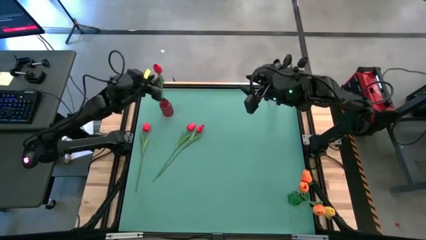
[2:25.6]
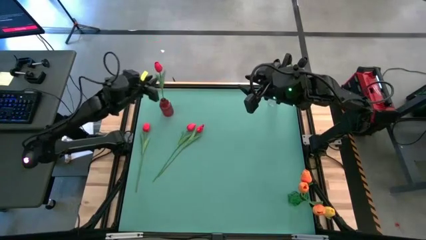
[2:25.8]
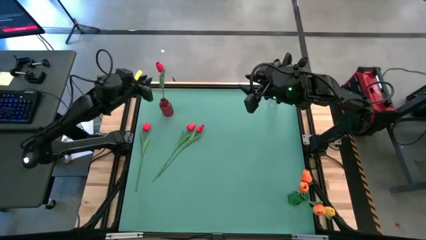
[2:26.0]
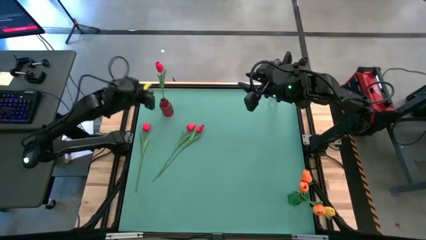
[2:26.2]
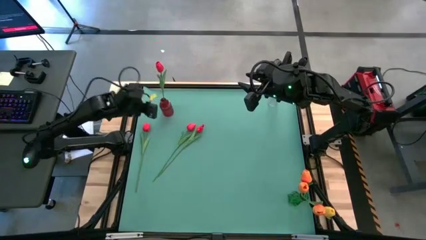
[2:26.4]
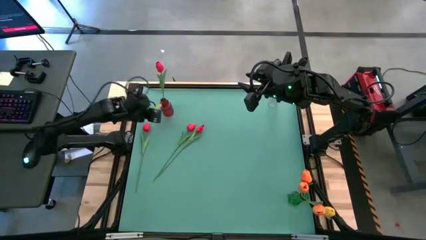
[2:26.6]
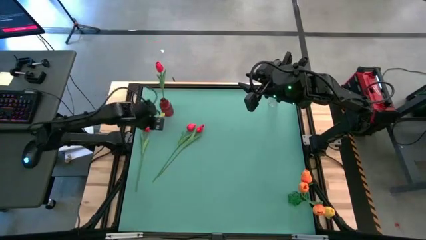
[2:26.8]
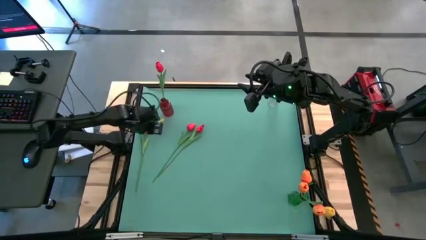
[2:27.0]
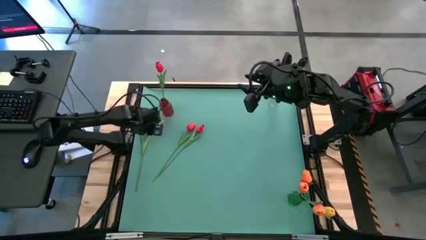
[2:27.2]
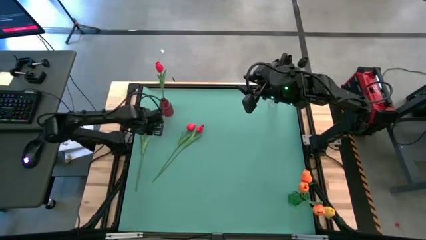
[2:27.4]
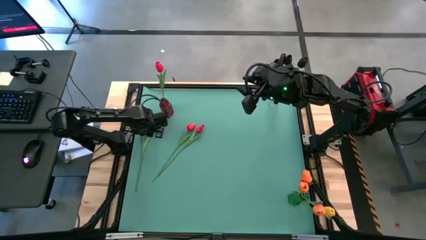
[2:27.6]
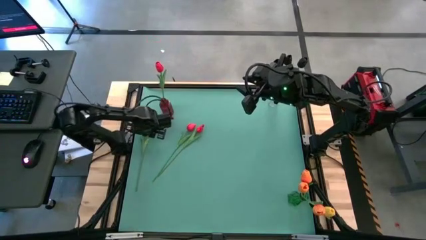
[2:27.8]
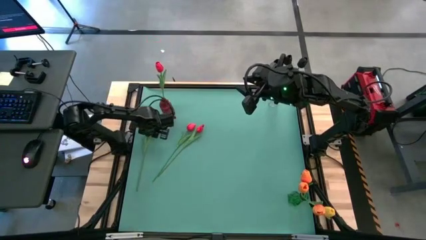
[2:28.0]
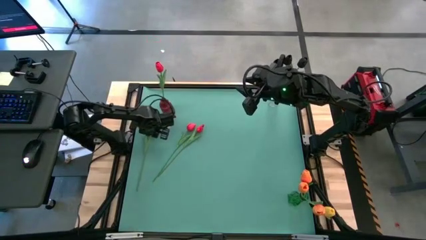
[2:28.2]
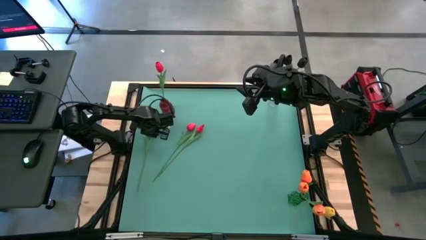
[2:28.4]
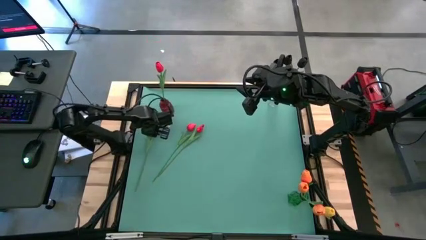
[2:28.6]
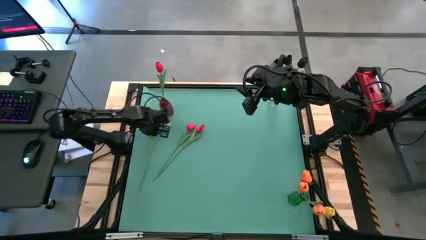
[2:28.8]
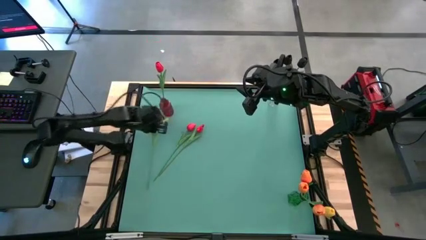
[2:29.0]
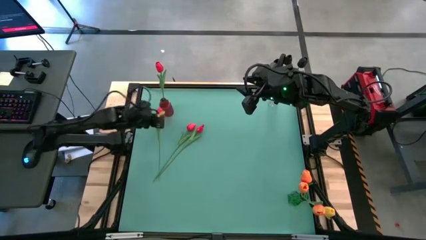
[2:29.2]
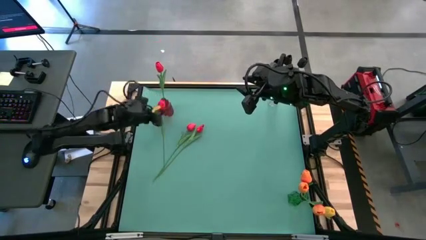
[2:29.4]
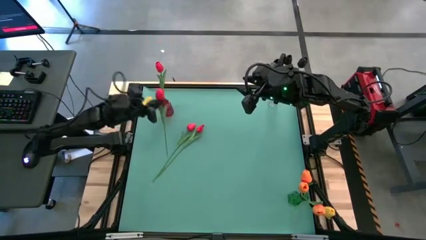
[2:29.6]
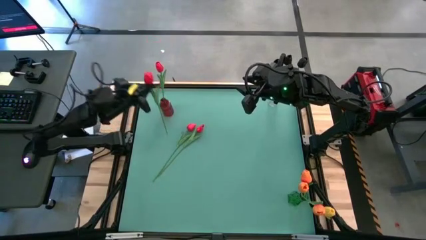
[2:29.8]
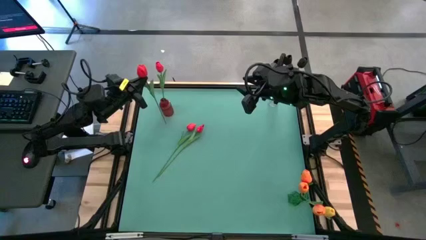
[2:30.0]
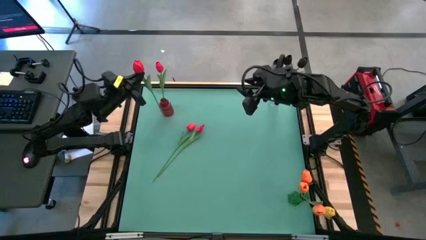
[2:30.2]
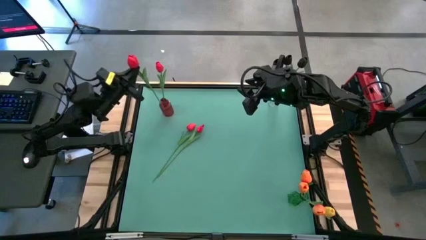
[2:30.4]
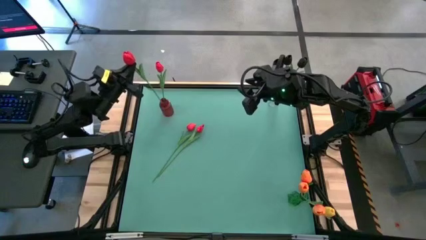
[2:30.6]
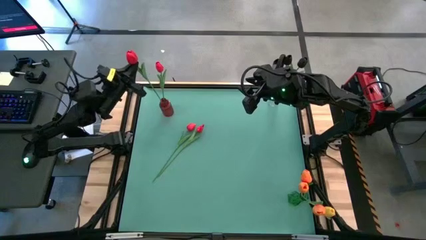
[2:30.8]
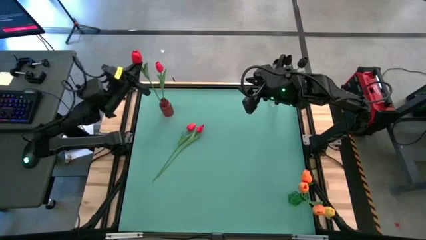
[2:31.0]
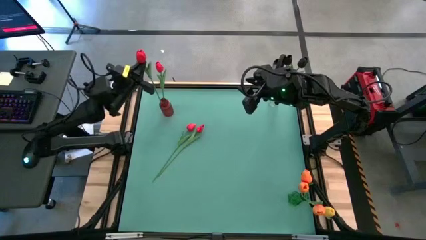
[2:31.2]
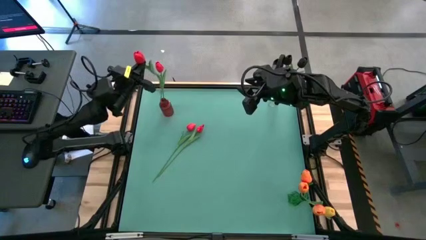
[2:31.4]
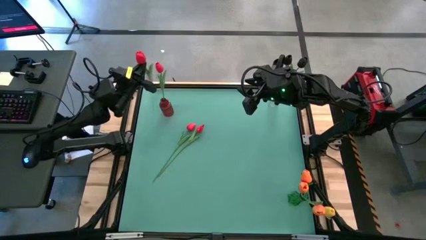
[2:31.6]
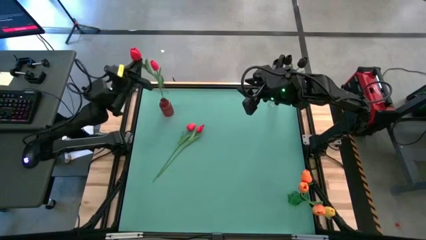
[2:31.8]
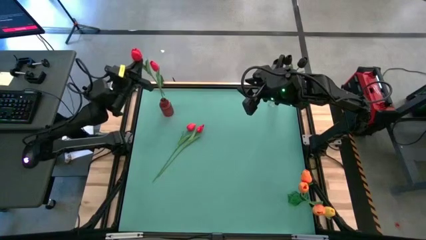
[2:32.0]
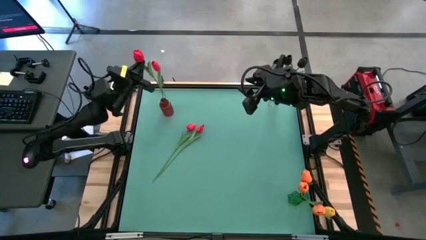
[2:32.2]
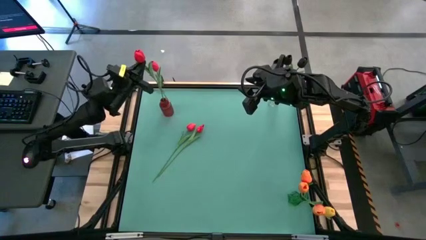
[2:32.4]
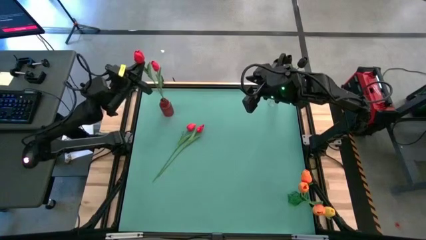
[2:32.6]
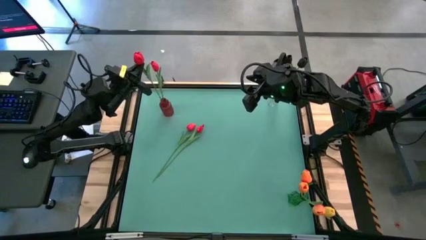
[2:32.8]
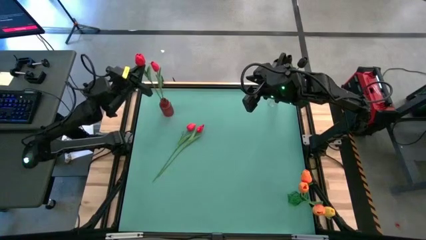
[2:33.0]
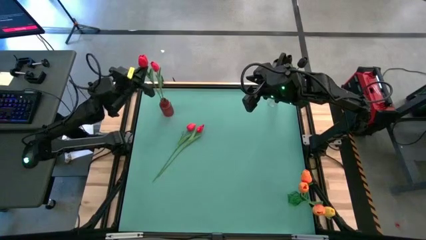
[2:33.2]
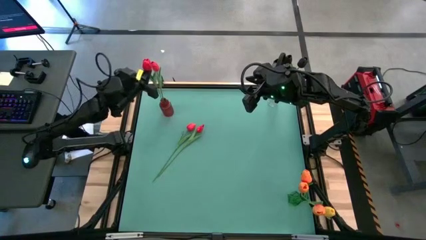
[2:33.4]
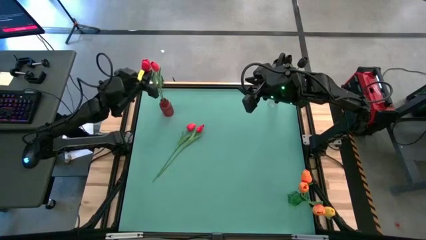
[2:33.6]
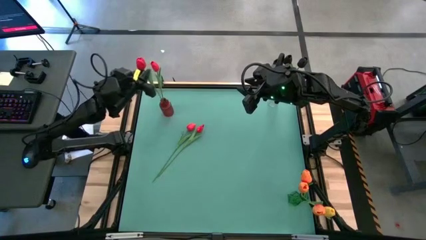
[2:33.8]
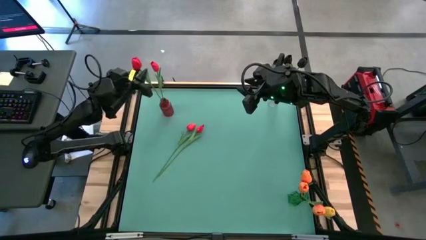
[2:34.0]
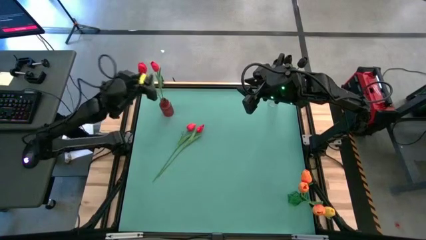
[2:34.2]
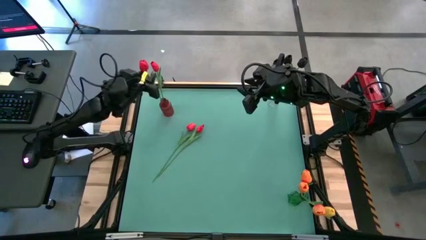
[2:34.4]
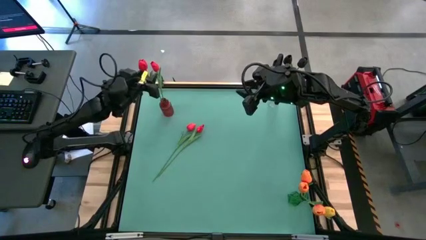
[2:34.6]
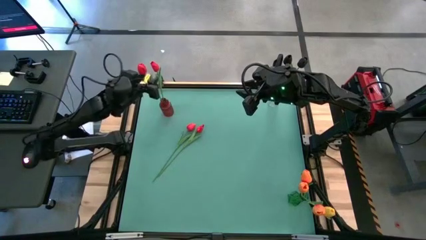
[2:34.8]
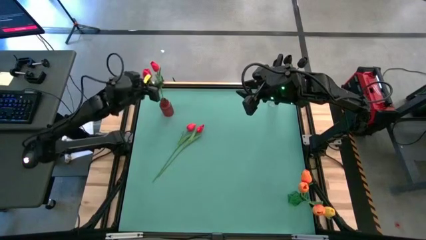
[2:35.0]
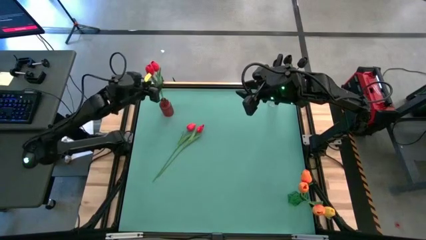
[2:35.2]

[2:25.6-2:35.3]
Task: Sort flowers into vase by color
Put the red tulip into the red vase

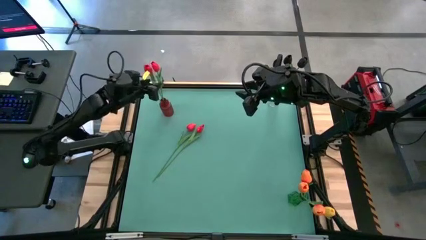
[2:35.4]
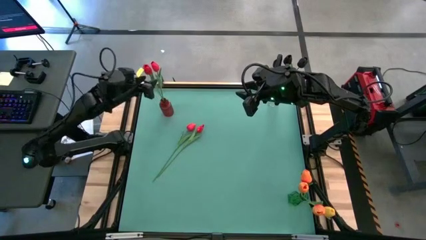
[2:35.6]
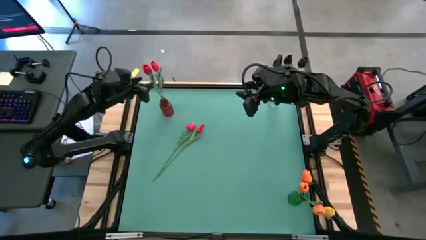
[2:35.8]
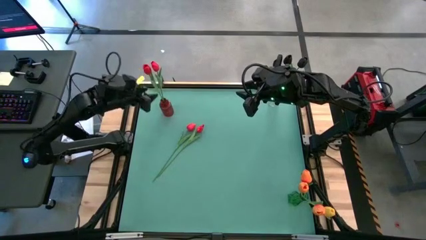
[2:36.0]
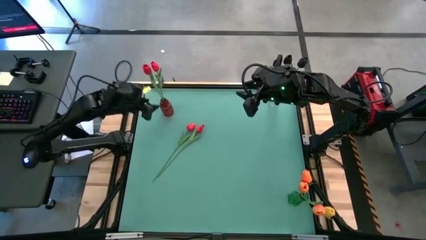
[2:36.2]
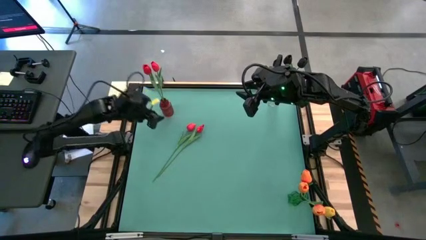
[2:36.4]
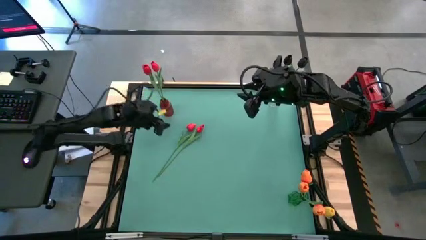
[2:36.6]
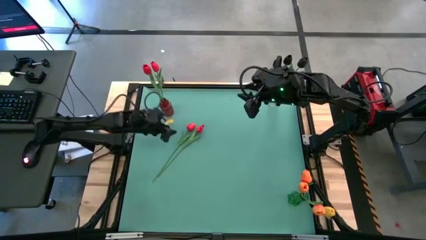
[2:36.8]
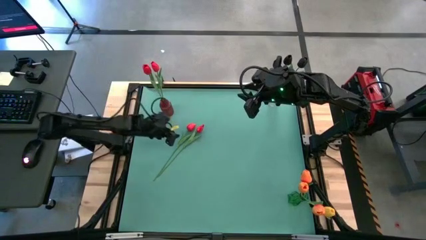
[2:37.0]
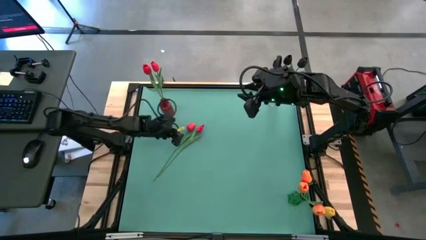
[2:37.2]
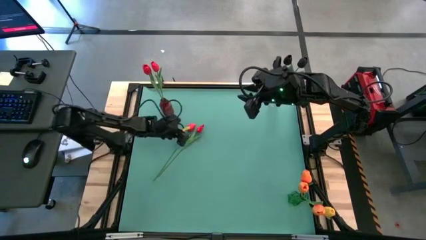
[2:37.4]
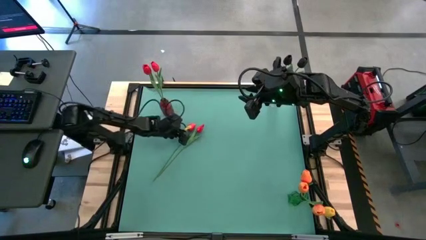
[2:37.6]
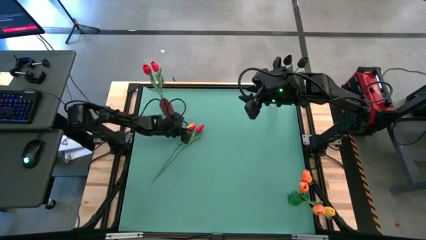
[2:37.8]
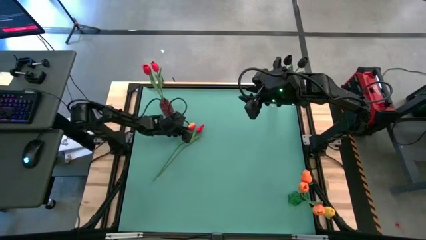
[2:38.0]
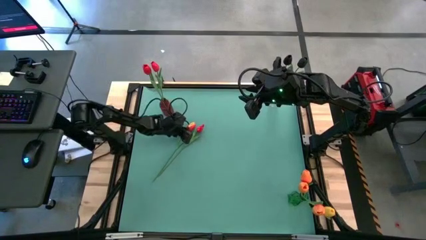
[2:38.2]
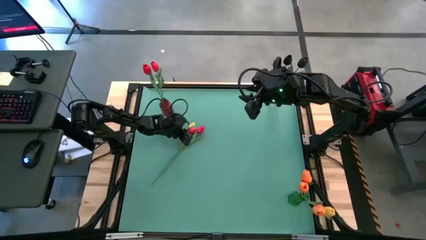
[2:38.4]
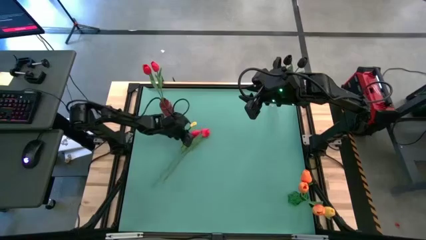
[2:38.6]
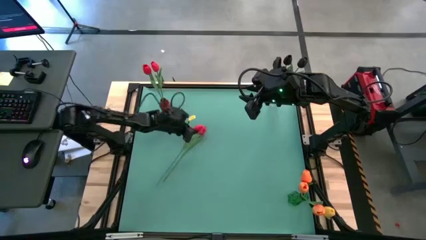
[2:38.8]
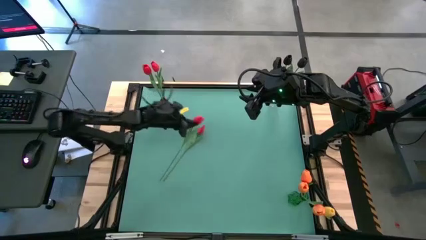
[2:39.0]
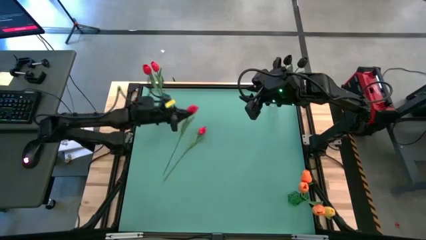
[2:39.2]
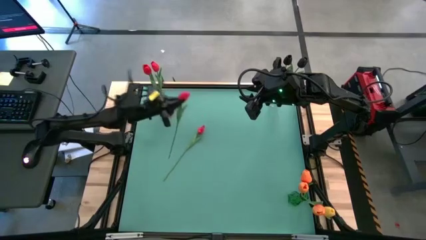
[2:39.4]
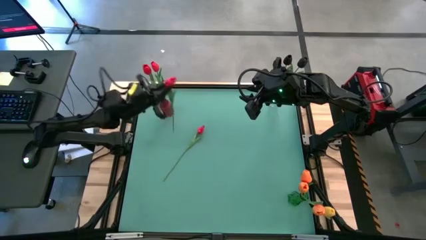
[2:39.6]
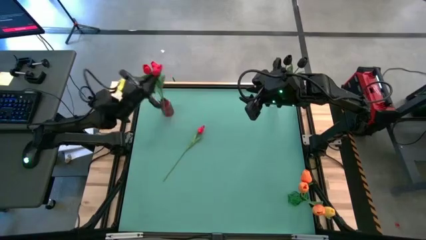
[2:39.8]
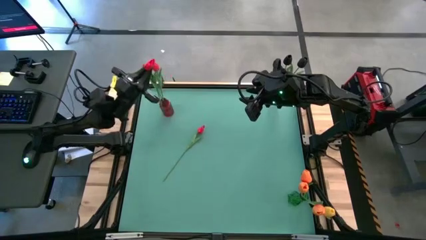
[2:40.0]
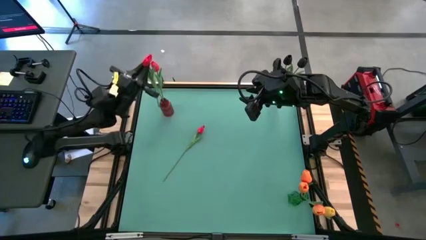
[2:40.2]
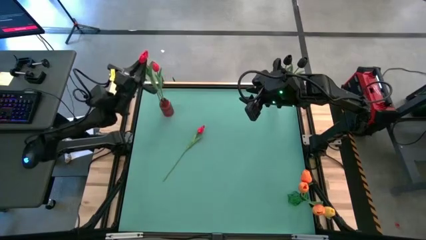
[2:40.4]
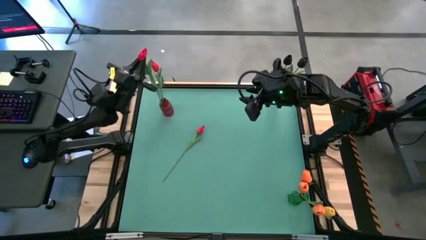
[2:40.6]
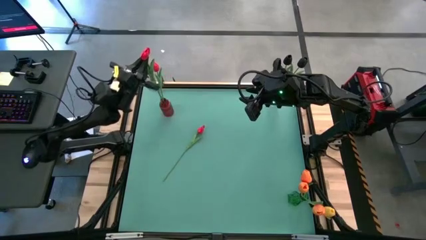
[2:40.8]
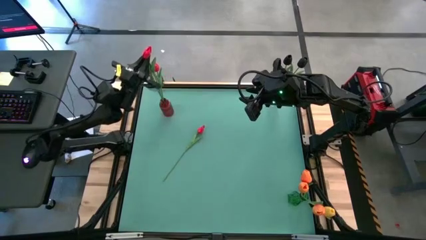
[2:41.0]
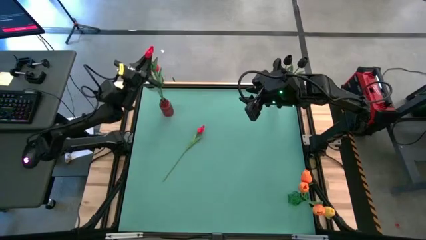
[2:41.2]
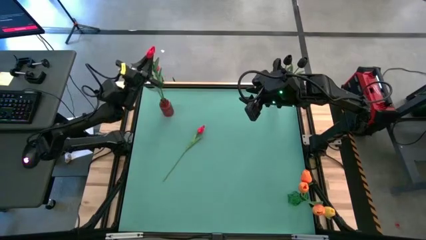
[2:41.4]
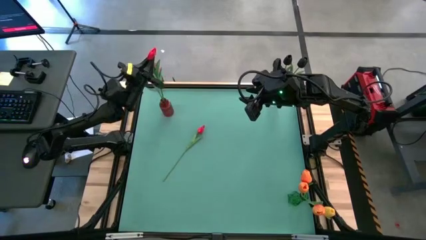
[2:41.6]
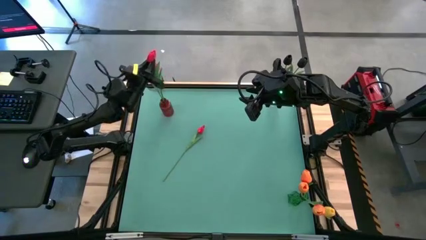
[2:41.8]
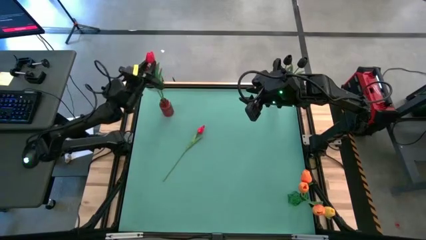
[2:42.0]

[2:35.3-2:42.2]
Put the red tulip into the red vase
